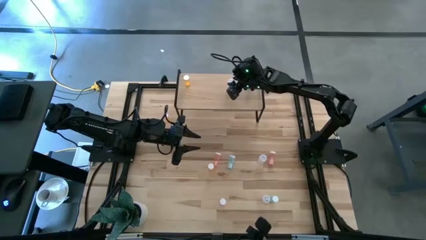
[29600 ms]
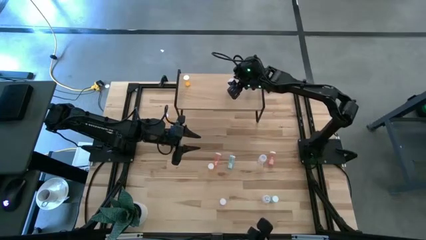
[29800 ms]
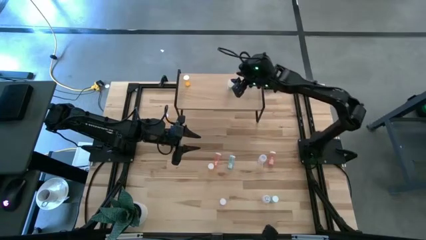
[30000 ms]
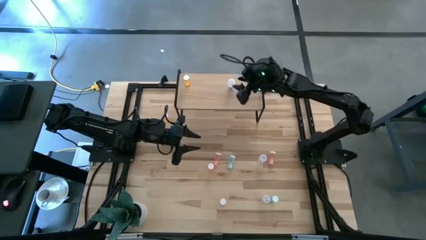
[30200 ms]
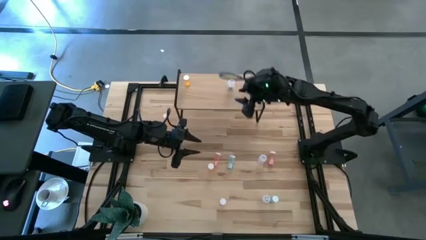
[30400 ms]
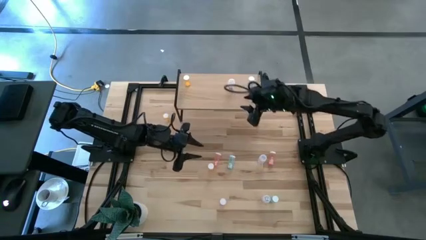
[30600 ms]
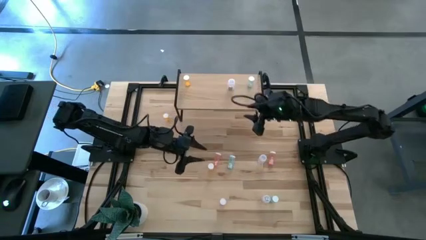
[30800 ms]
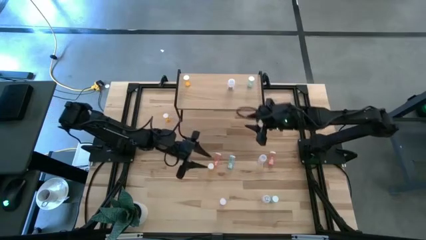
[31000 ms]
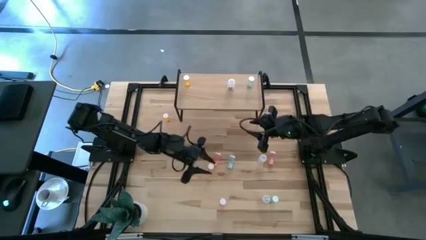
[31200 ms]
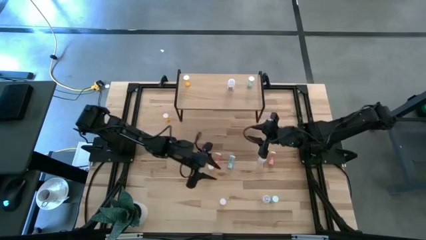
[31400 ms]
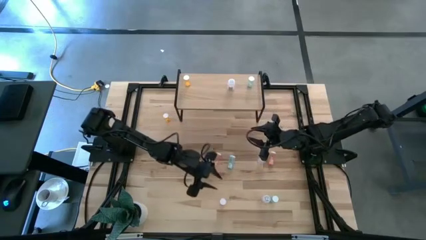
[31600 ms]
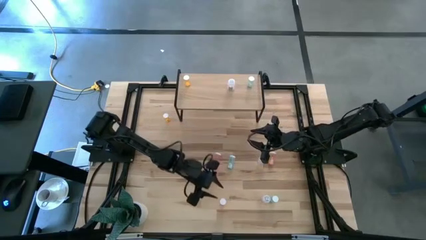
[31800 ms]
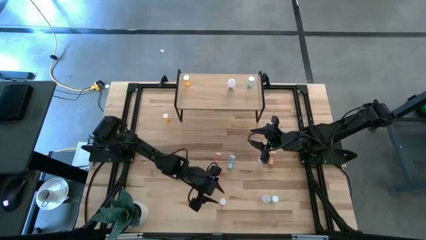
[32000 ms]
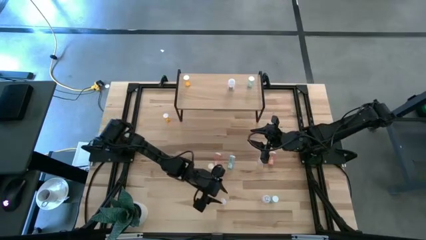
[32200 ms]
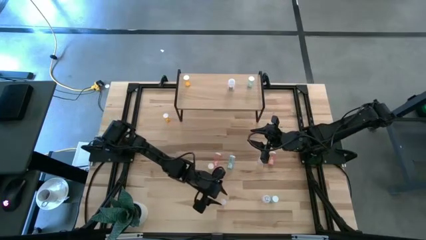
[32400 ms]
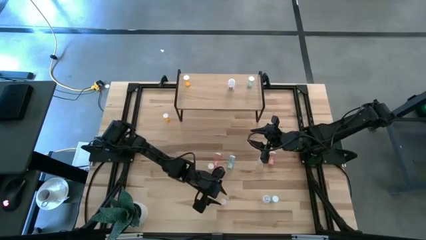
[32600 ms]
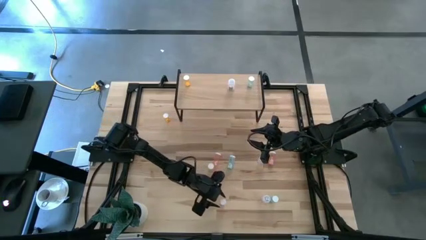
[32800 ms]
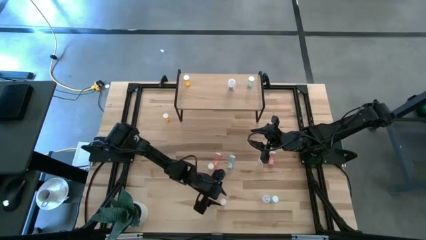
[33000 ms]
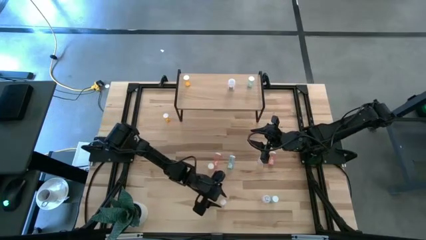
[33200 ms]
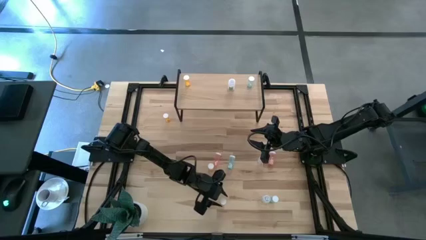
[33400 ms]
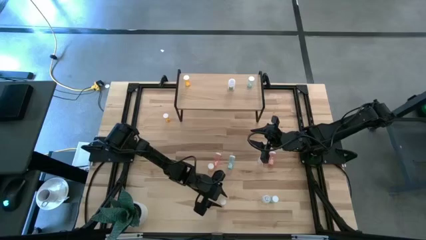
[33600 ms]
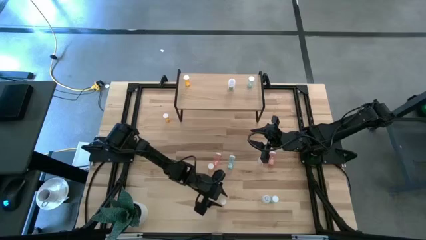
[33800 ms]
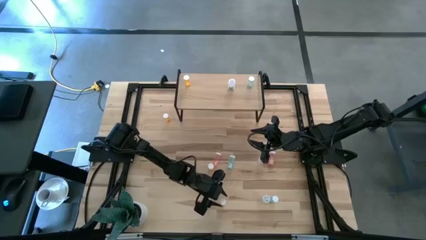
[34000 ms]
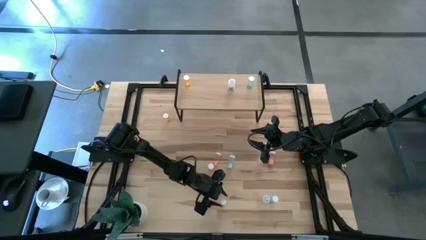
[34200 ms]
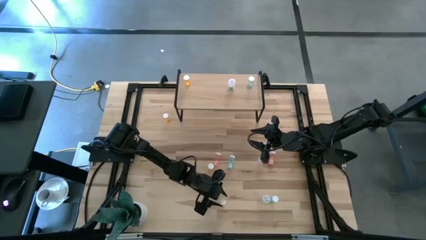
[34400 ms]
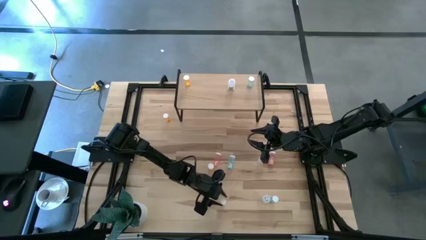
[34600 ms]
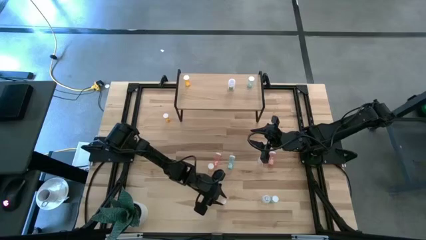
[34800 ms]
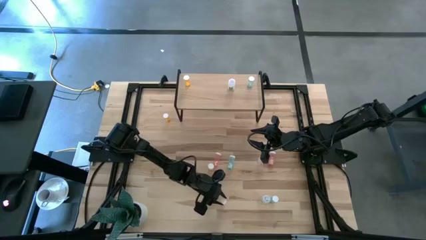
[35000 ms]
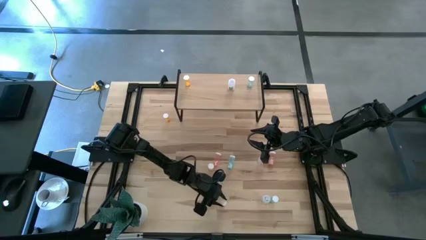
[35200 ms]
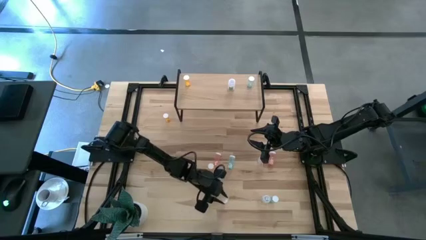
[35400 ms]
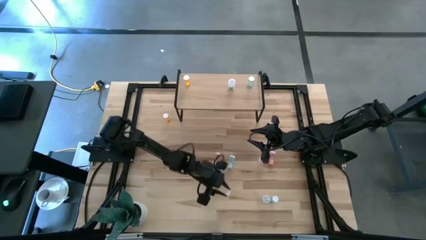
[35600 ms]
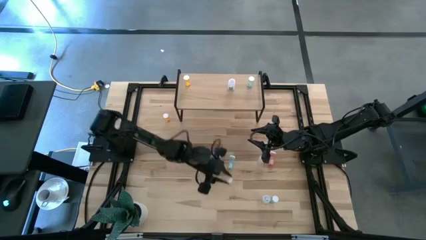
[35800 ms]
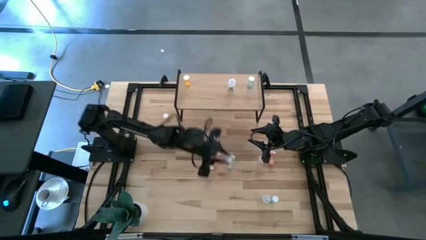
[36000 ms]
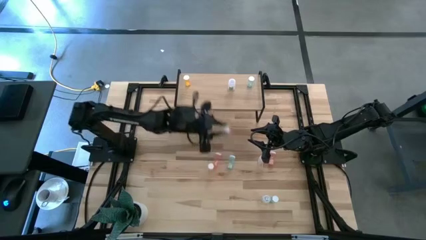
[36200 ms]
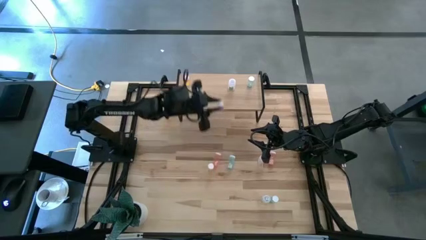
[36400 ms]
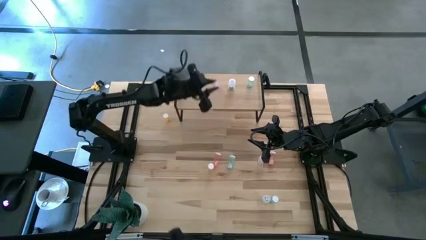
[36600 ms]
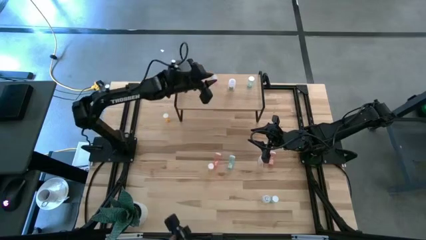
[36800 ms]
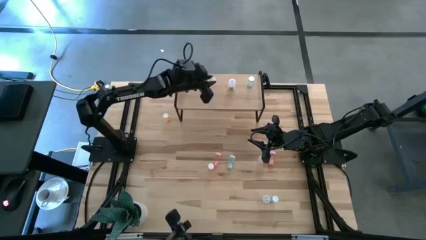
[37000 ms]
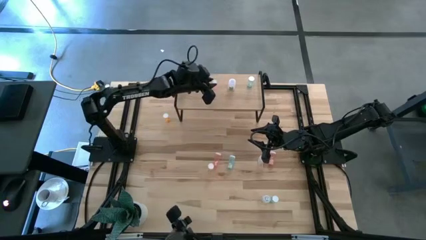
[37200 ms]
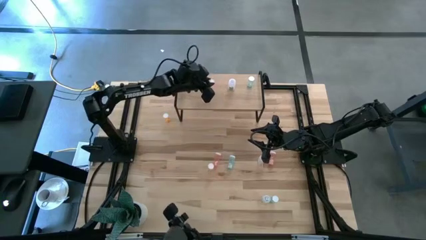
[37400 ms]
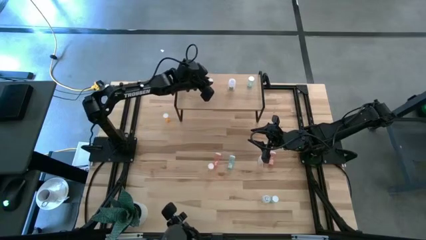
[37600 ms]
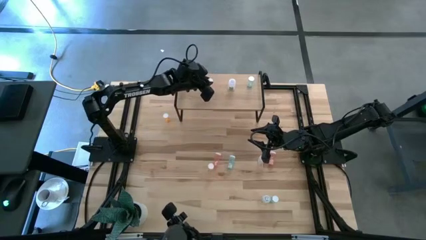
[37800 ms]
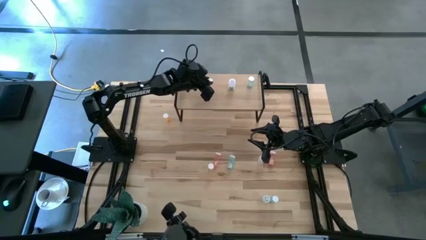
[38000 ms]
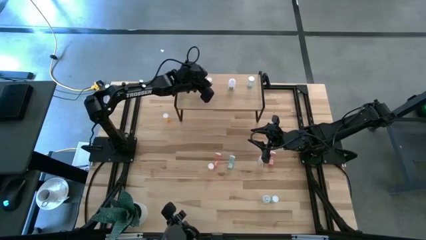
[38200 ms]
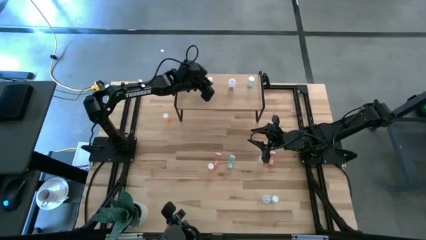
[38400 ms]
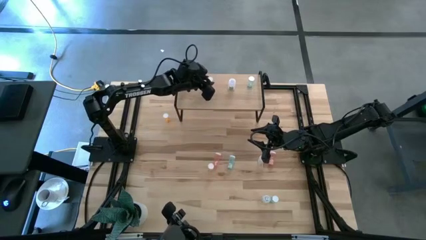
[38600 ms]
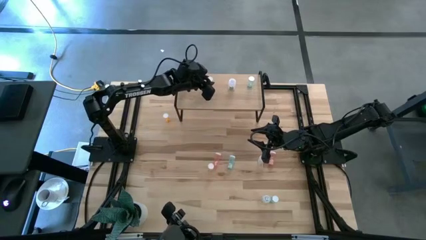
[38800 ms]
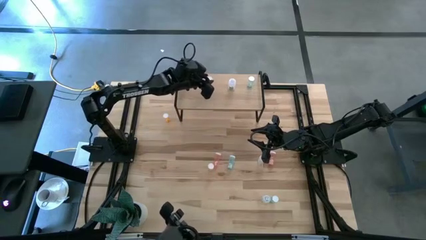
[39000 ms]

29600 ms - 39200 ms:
Task: Pick and place medicine bottles onto shelf by color
Put the bottom pink pill bottle on the shelf

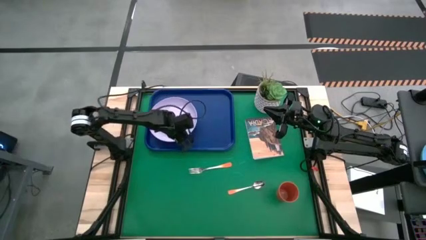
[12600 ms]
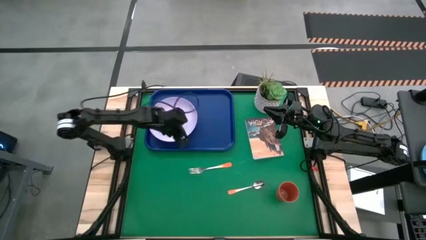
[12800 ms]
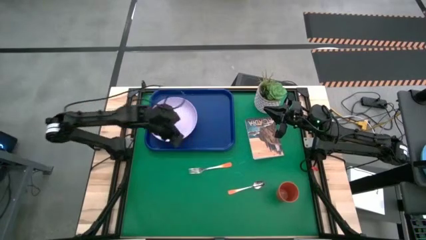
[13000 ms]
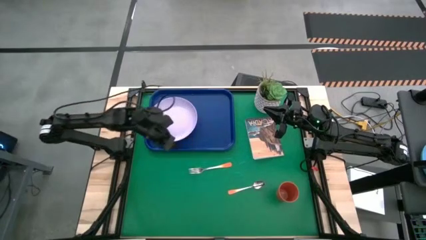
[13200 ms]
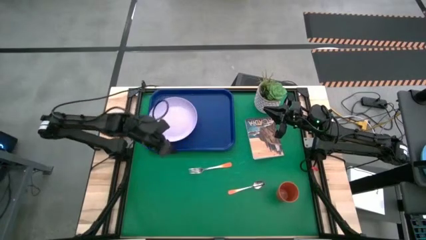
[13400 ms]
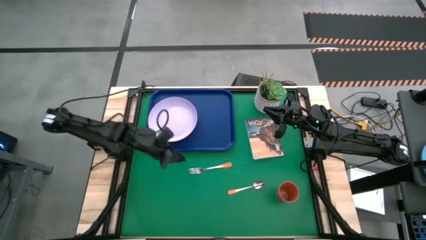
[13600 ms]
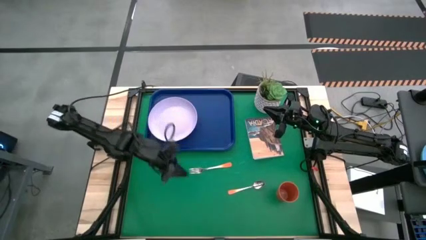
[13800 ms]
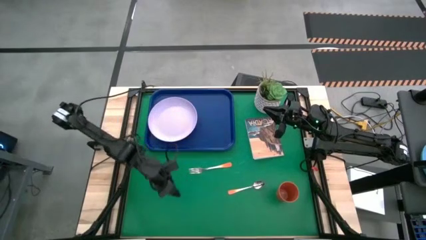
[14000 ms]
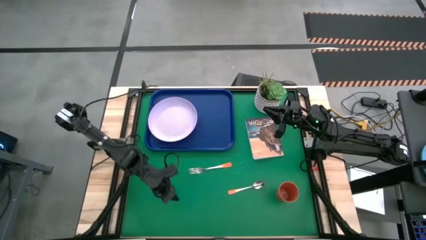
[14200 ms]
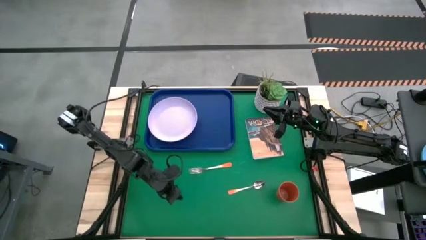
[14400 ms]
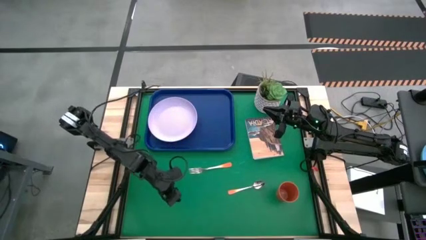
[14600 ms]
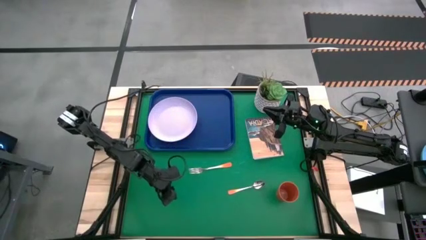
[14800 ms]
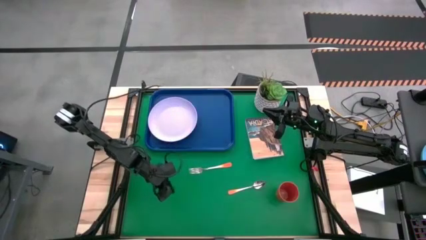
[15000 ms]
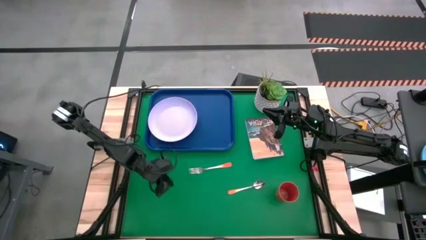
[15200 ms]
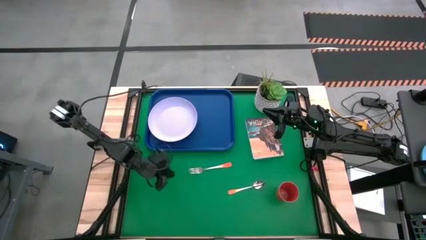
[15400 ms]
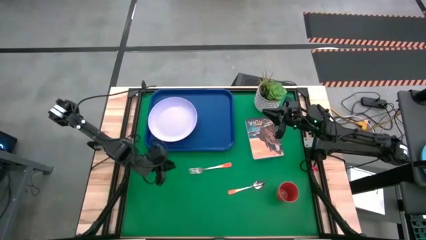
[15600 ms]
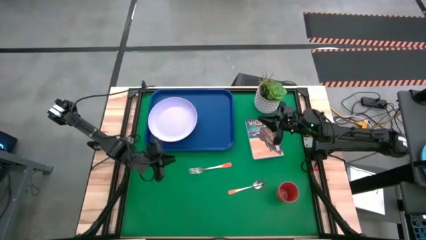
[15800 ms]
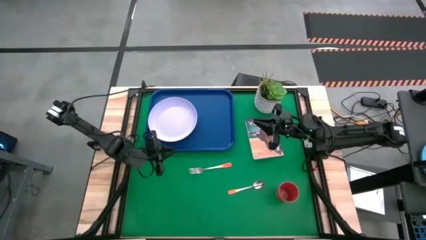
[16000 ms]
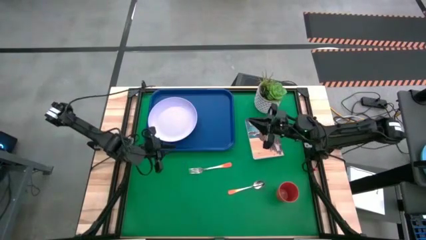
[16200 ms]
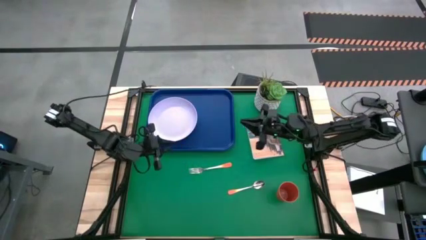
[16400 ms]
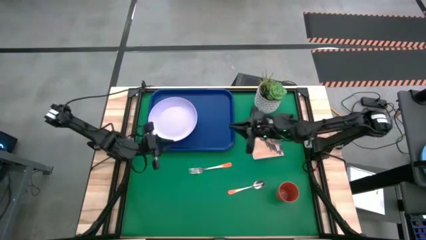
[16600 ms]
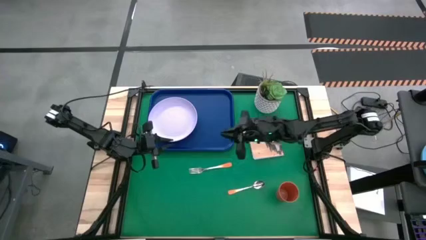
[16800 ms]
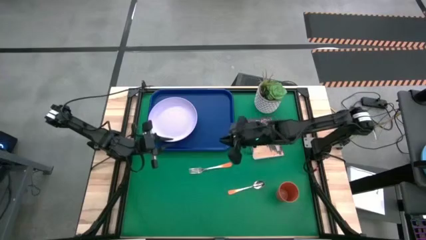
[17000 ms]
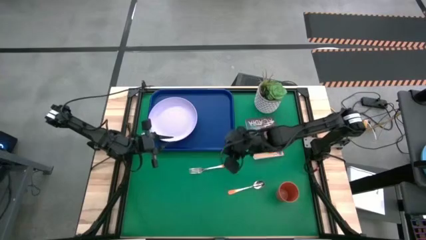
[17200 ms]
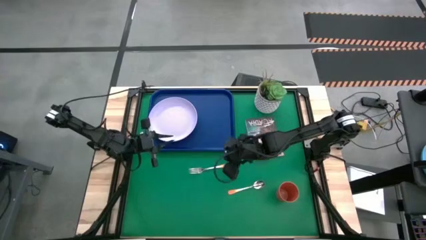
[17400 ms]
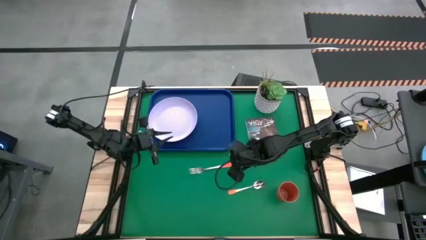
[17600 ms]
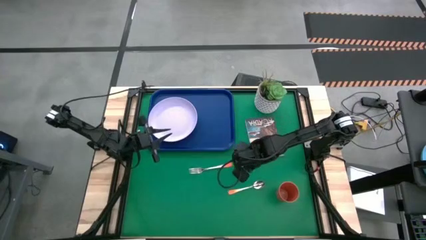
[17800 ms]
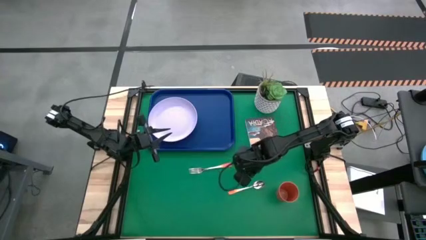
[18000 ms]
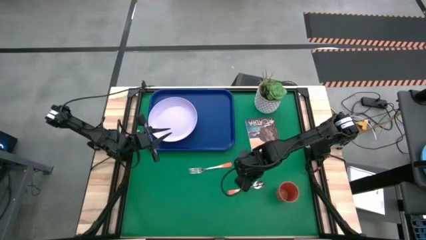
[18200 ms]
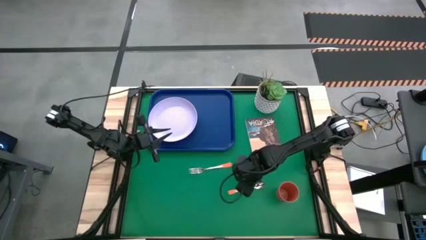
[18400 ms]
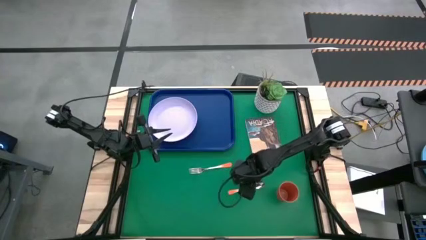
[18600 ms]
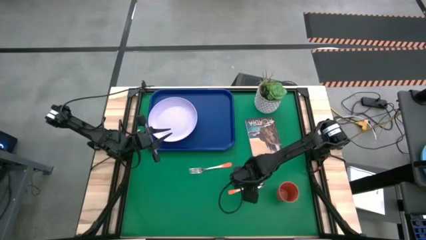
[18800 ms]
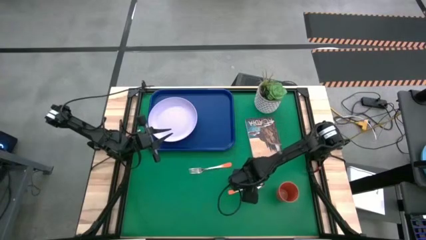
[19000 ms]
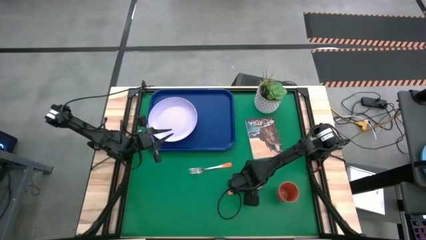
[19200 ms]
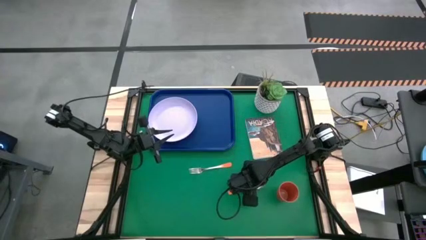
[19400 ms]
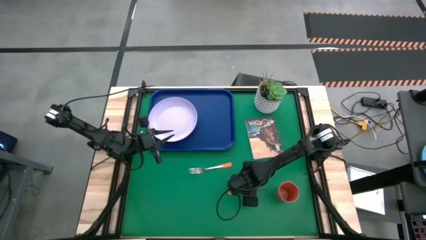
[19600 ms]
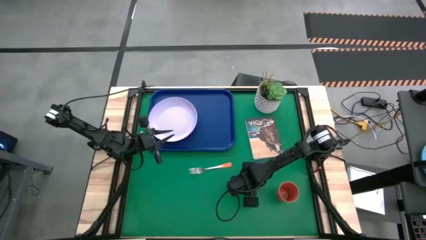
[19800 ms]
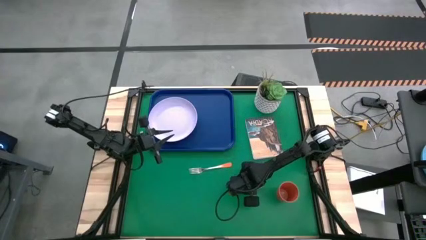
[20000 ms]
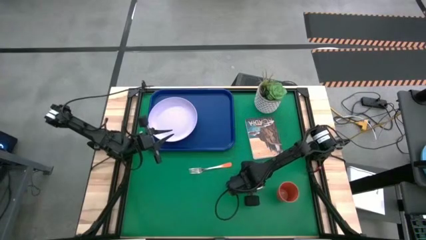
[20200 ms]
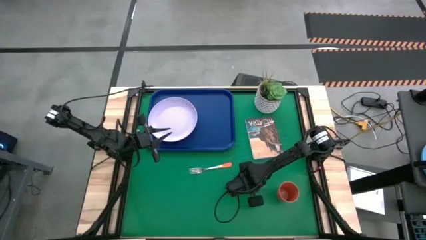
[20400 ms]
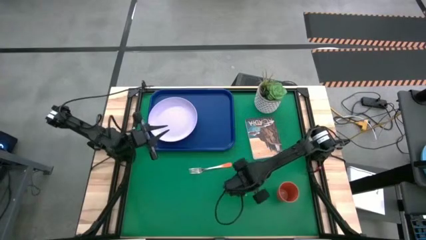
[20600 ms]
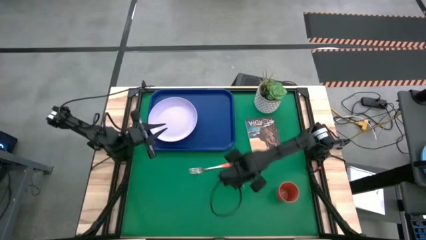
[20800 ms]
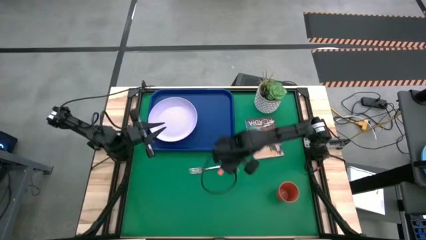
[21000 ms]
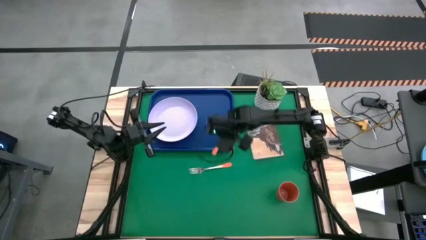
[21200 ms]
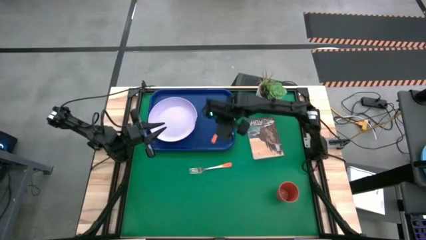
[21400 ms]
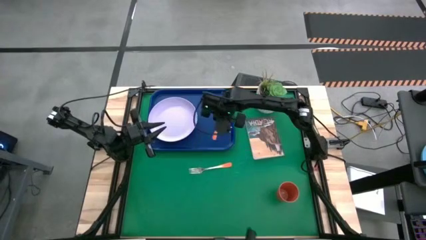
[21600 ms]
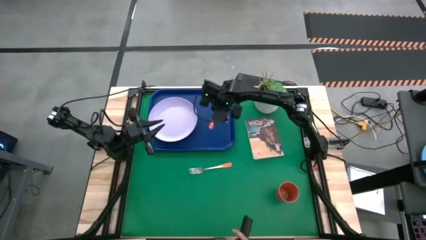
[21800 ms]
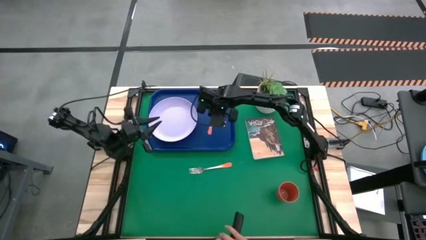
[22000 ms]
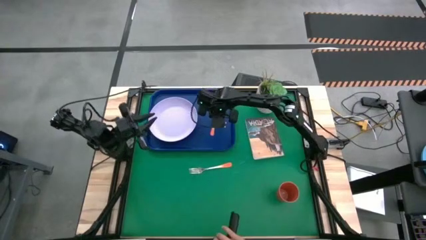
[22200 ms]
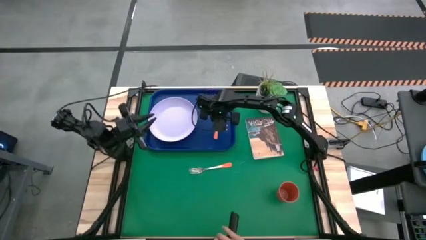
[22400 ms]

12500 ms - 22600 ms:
Task: Pick and place plate/cup/fork/spoon on tray
Put the orange spoon on the blue serving tray to the right of the white plate
